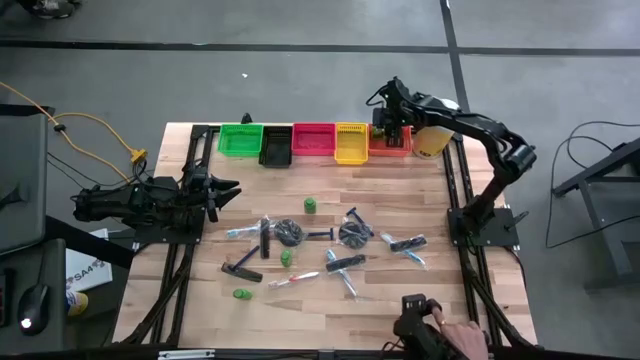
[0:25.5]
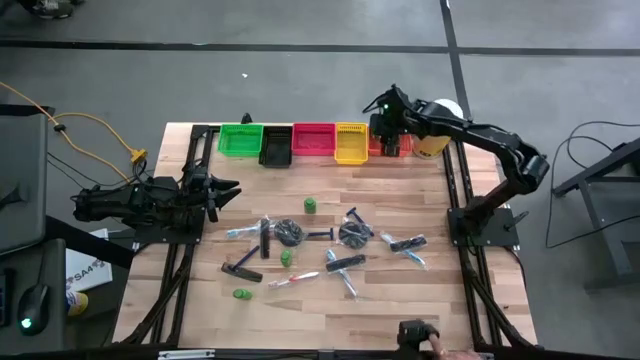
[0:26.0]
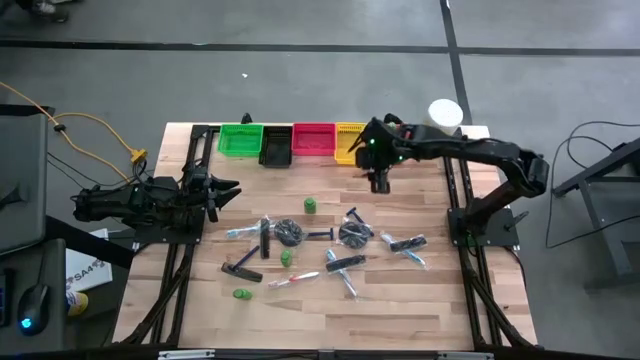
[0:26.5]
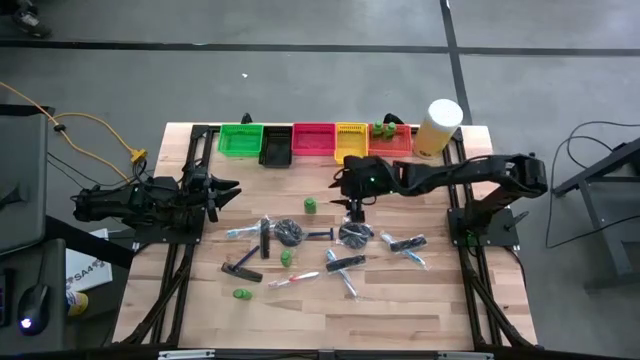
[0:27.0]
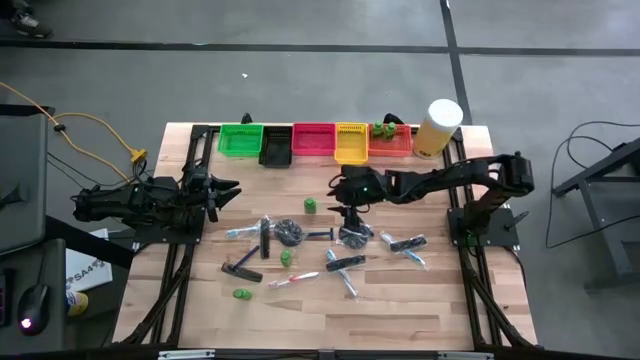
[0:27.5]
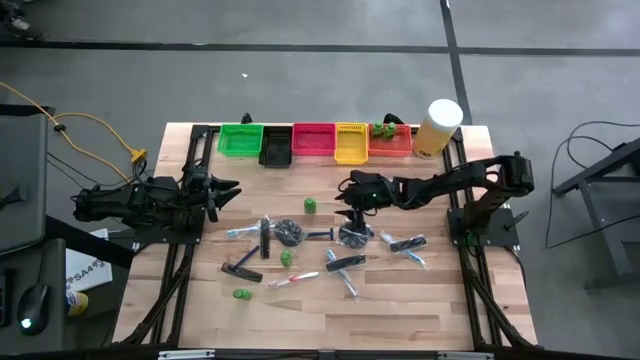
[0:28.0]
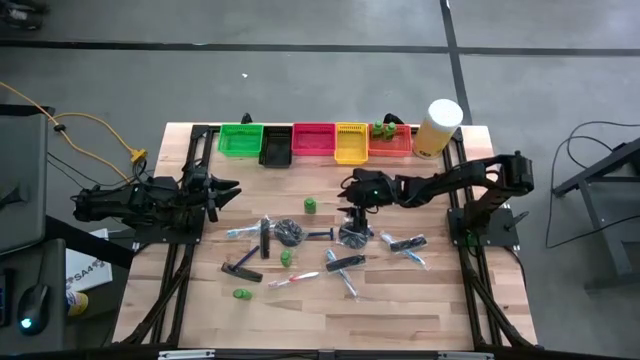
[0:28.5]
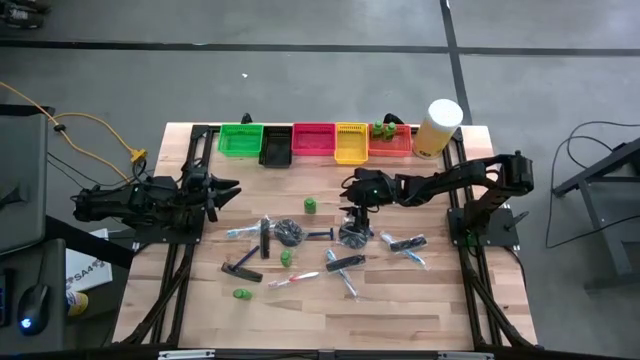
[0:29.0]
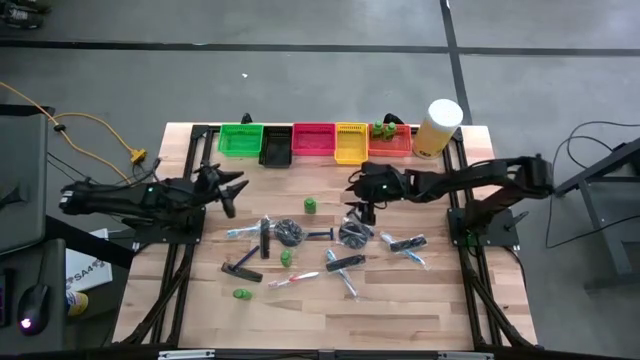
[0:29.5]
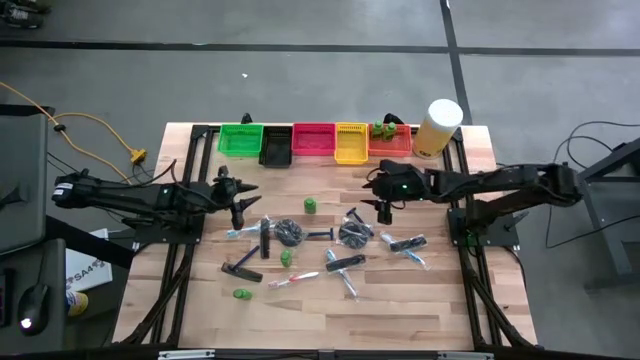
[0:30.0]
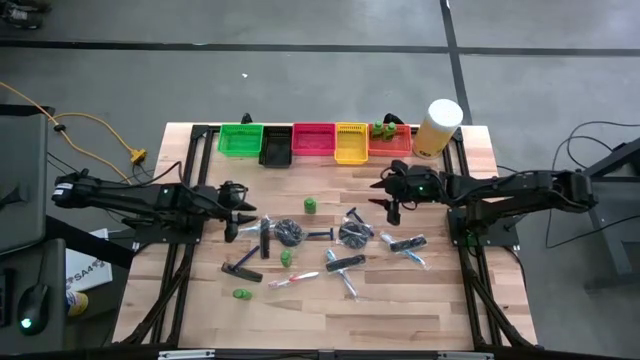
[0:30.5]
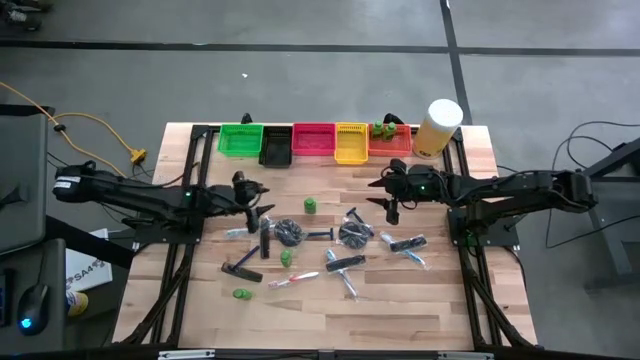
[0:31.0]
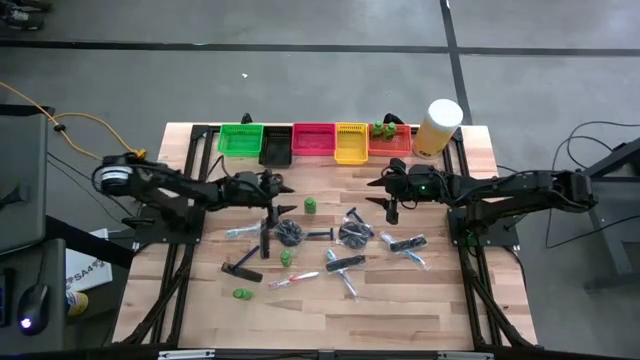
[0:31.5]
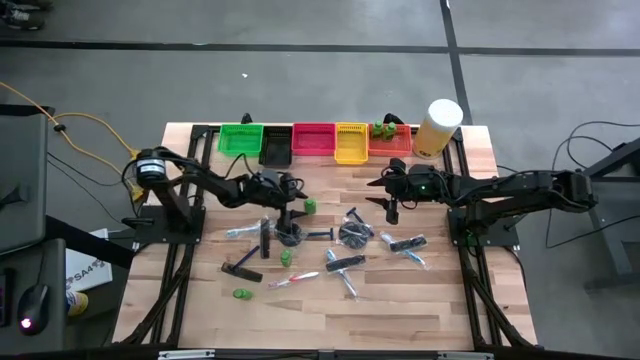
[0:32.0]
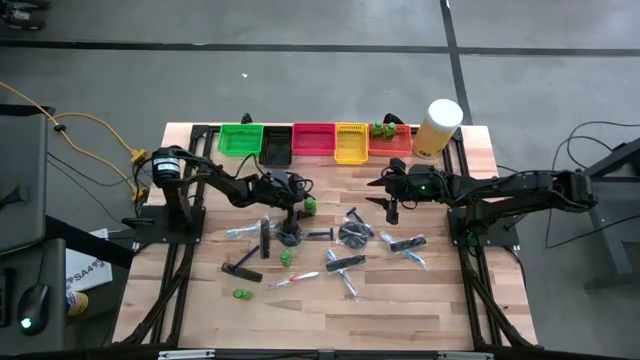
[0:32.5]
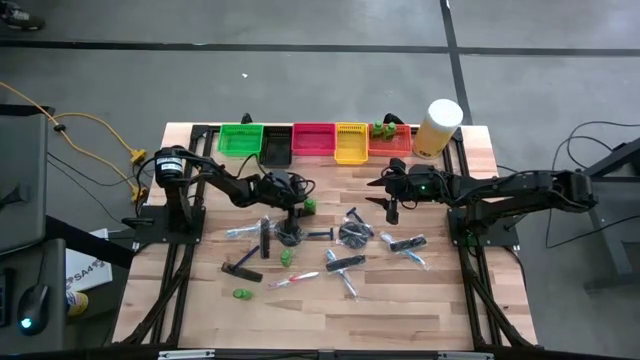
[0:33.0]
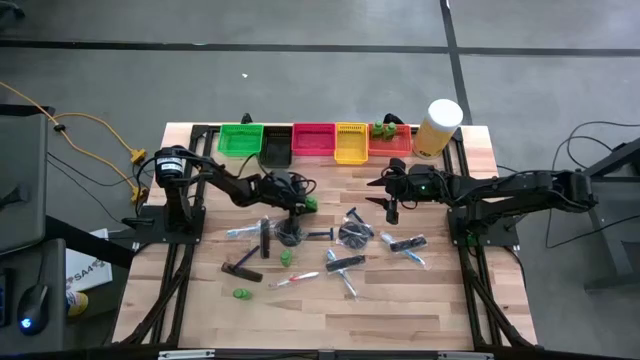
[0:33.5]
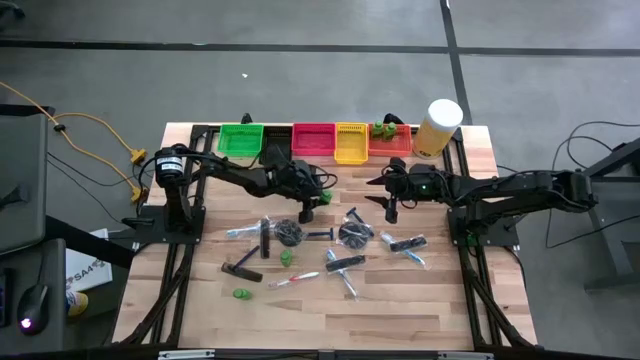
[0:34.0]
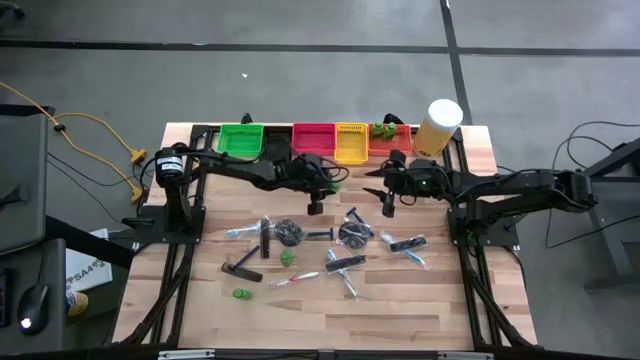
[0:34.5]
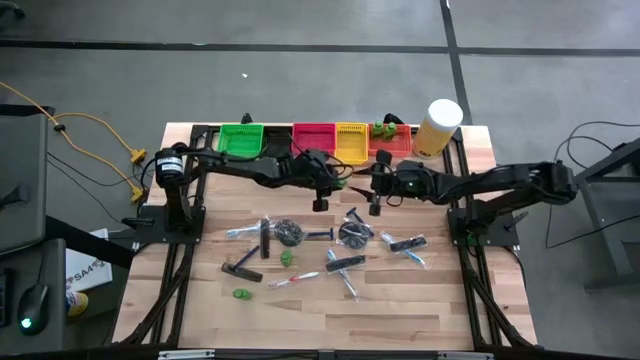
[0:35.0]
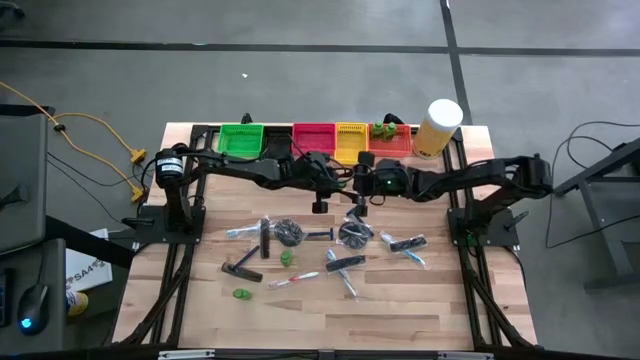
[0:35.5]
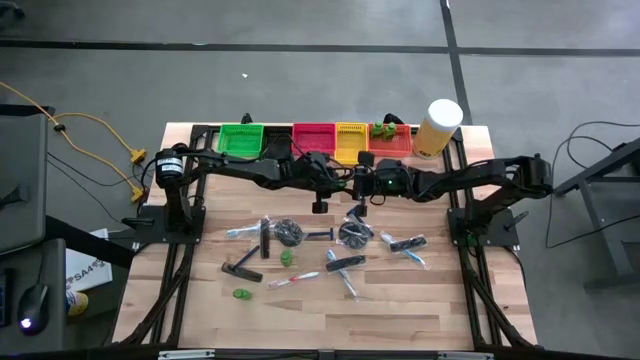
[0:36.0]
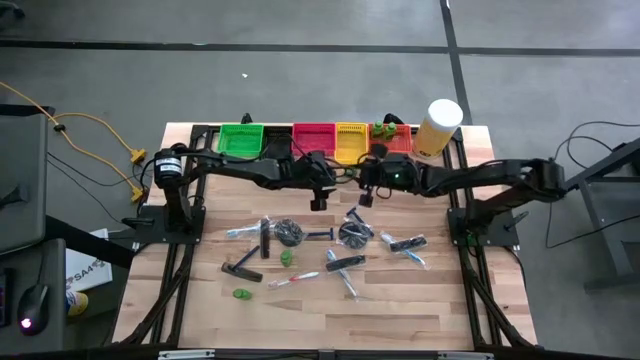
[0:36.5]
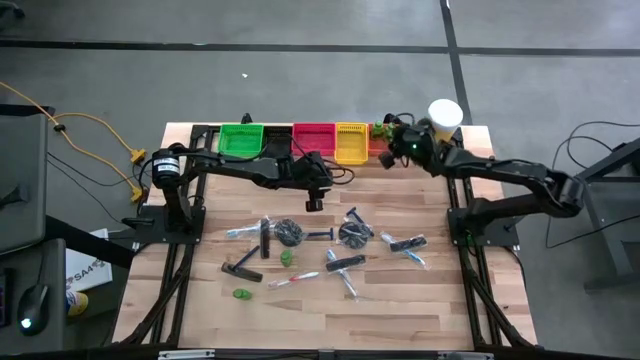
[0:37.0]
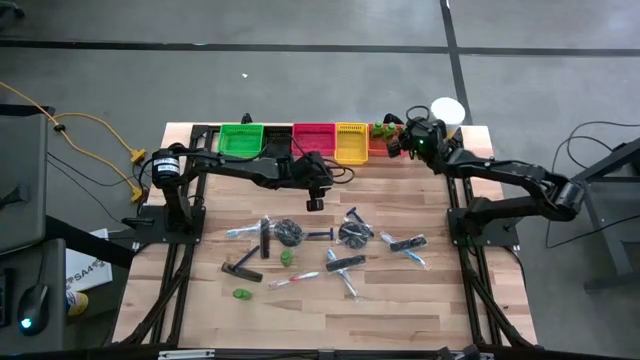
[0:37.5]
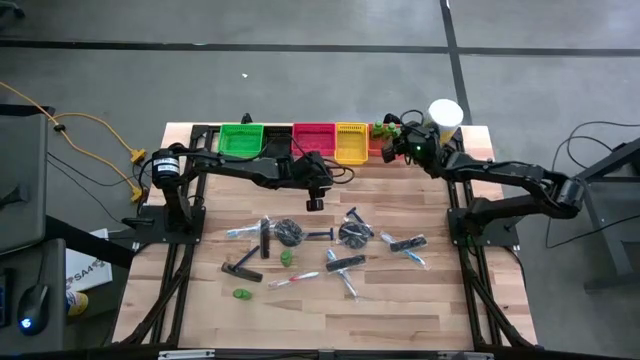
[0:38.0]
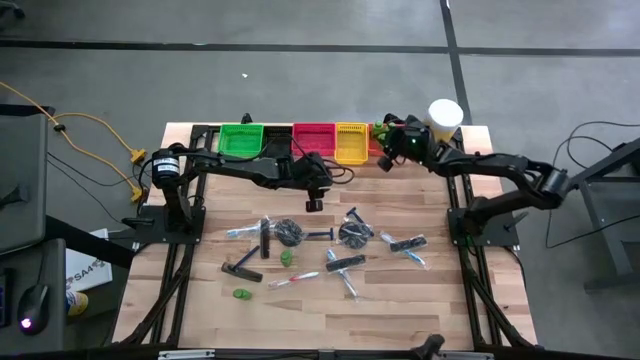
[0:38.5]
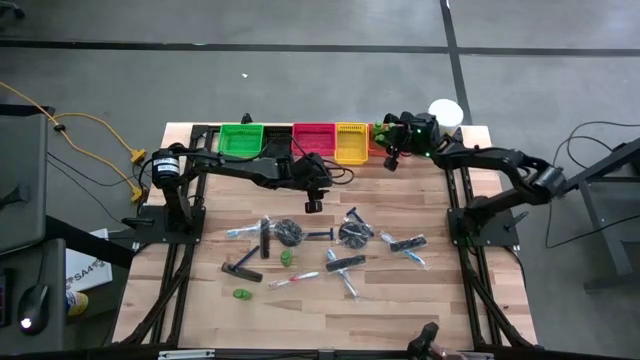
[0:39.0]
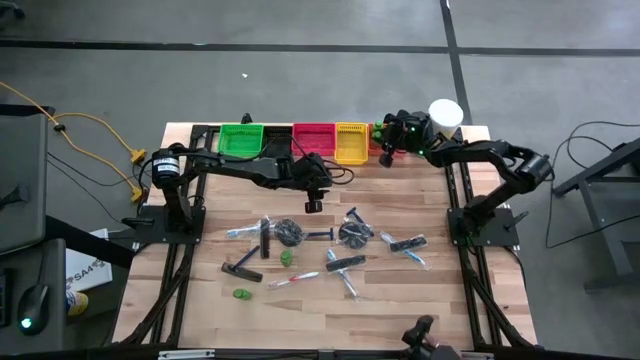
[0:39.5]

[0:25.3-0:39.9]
Task: Pick & Place Travel size toiletries
Put the green shampoo bottle into the orange basket

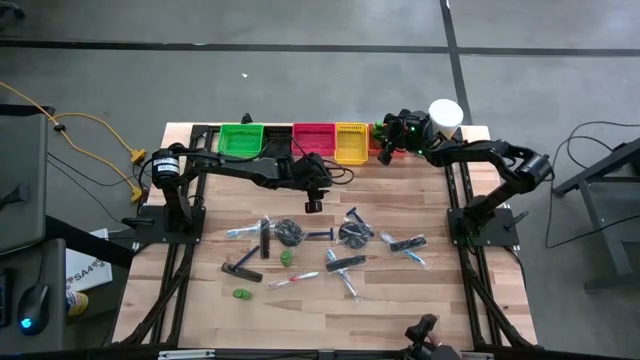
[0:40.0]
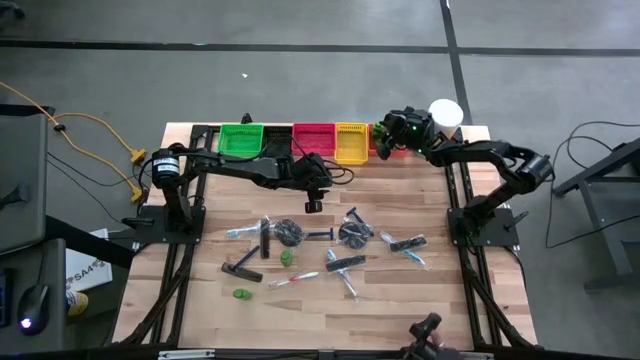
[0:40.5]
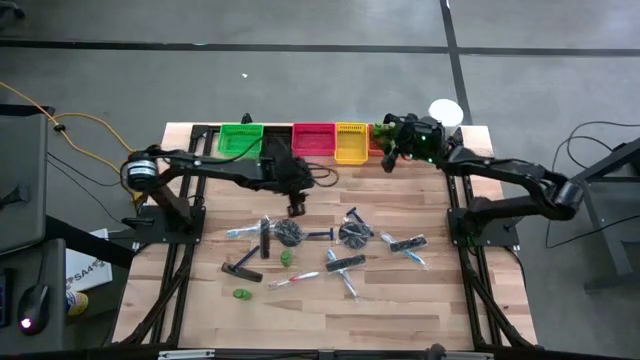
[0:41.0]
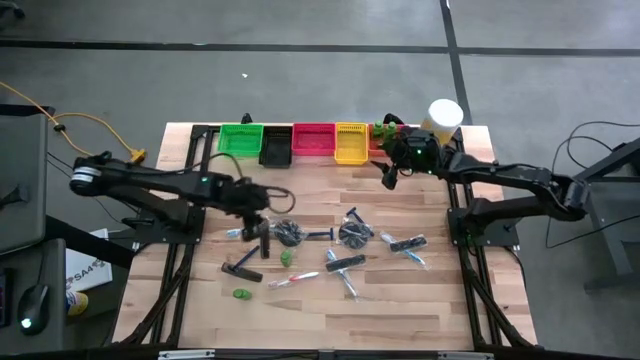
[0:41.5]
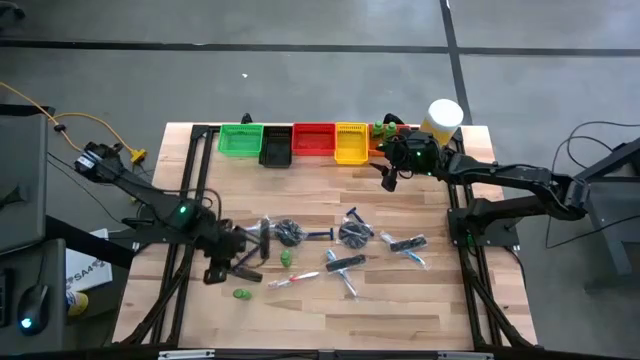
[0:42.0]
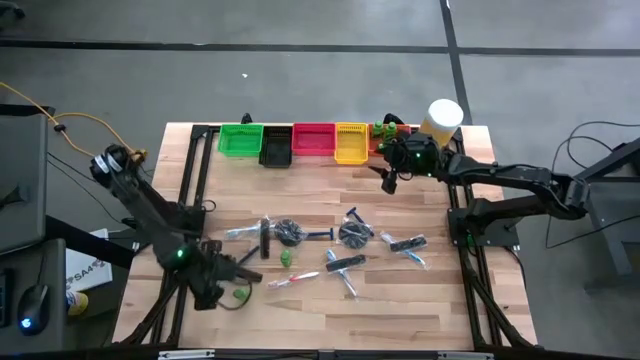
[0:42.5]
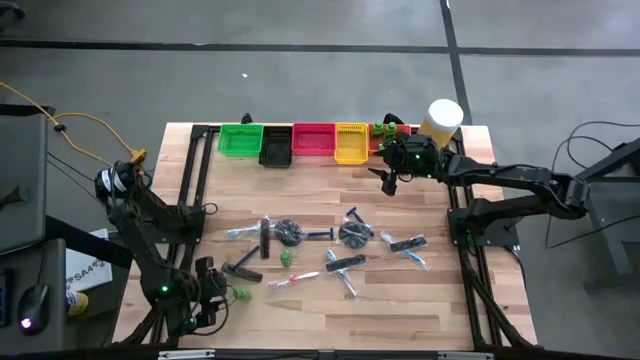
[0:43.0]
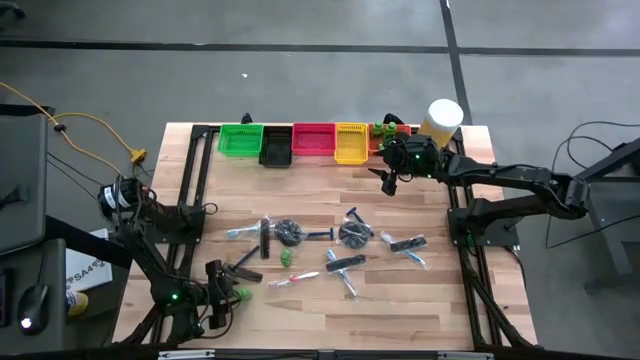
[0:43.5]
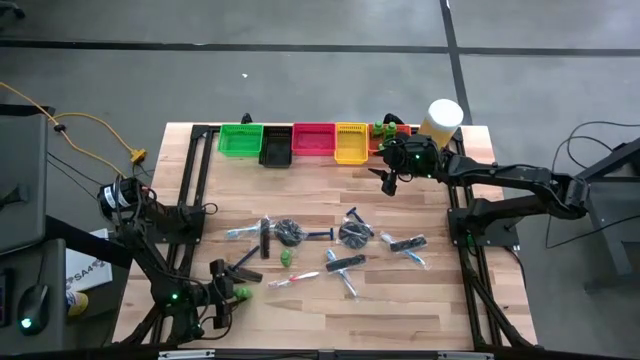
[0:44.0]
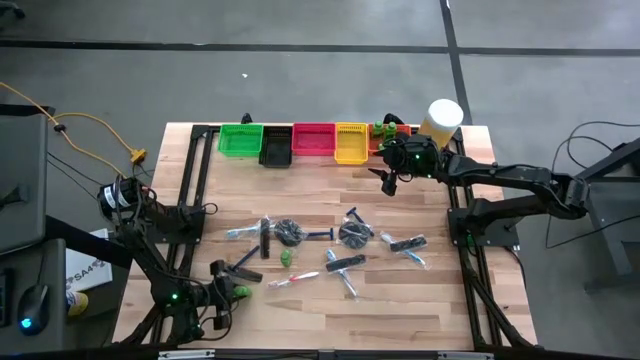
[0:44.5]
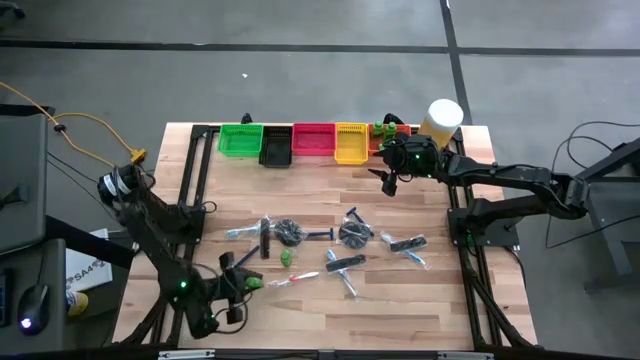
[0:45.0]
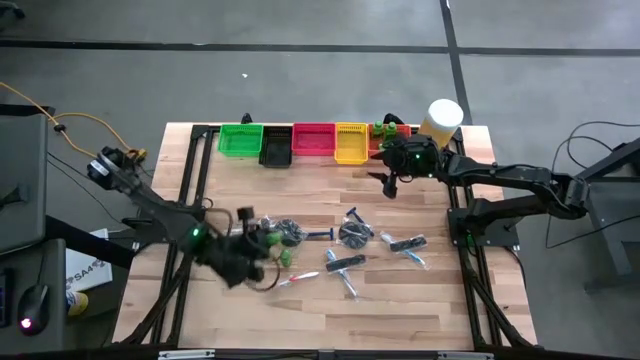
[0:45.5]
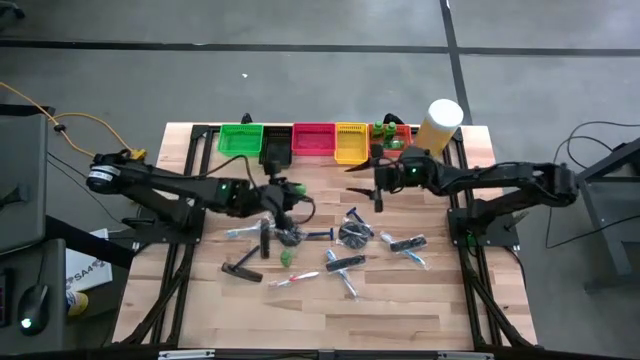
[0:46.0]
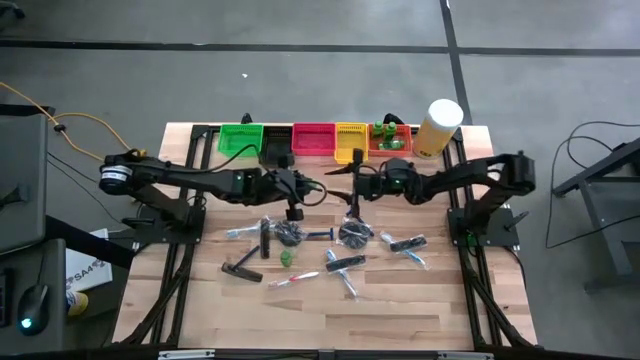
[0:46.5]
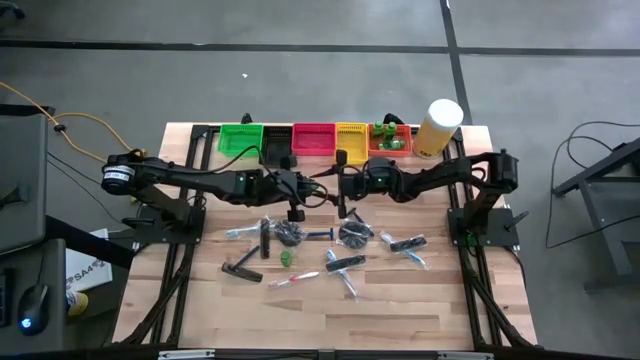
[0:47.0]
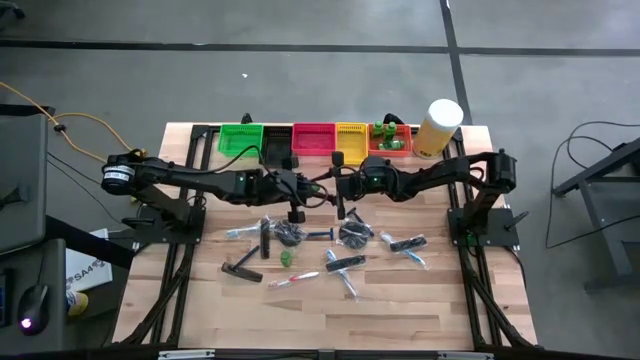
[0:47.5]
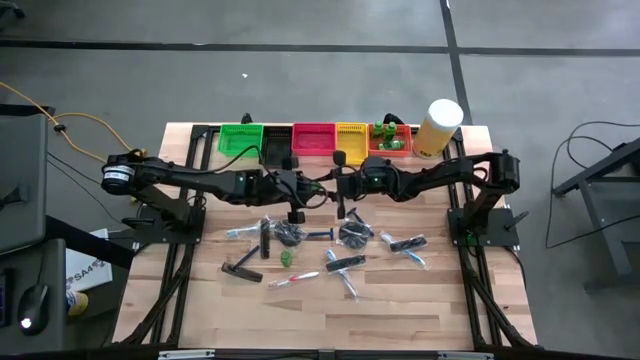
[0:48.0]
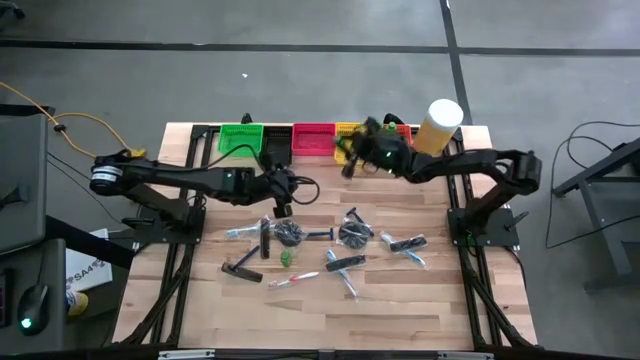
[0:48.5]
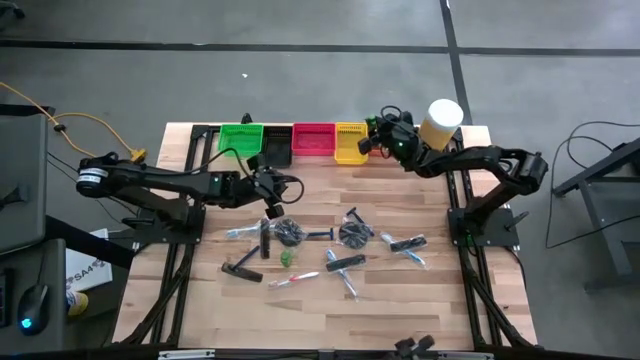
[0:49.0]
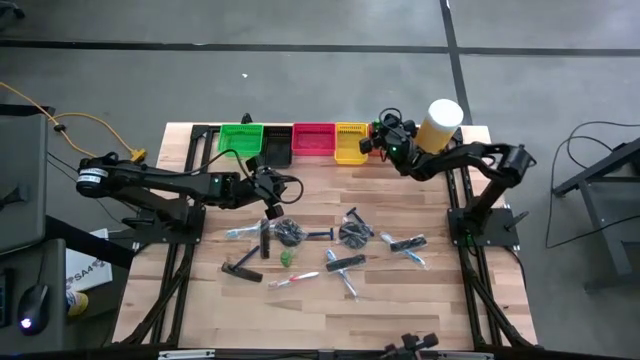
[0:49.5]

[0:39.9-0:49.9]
Put the green shampoo bottle into the orange basket
